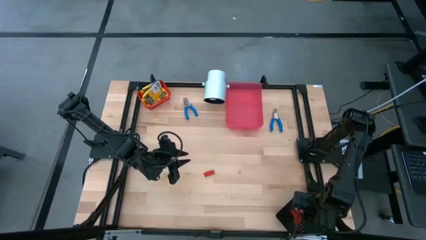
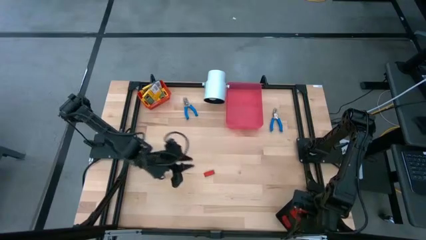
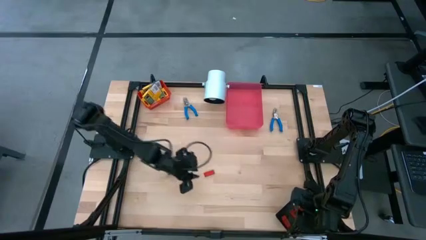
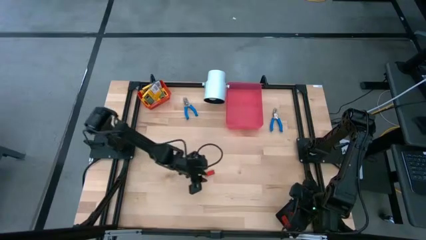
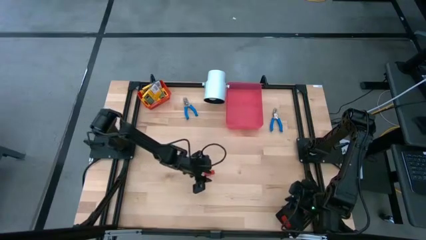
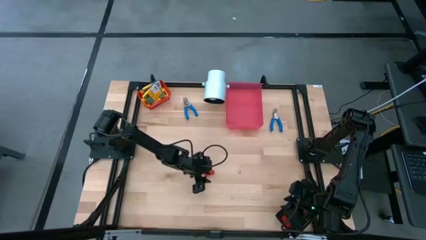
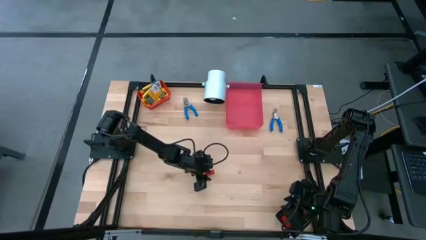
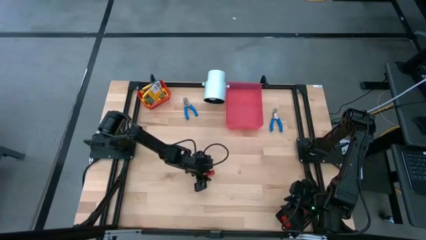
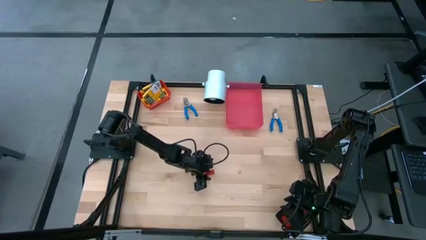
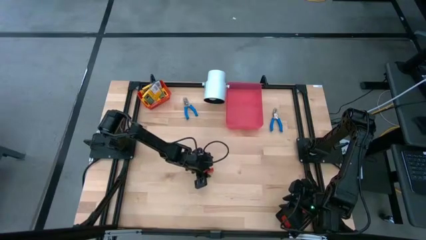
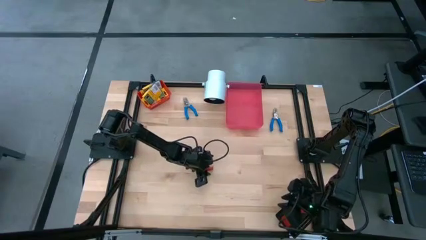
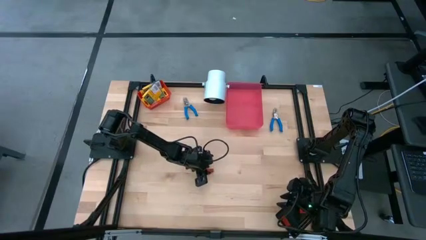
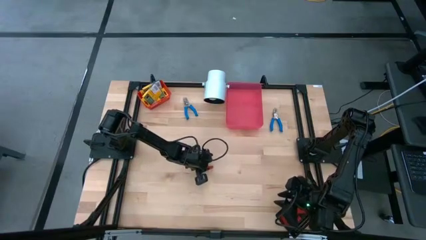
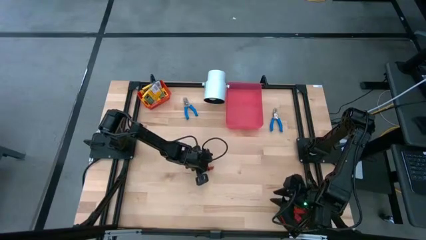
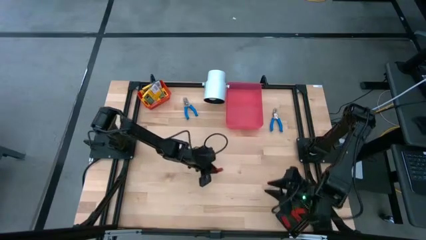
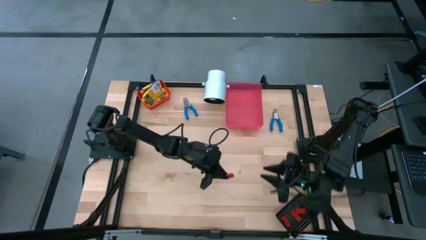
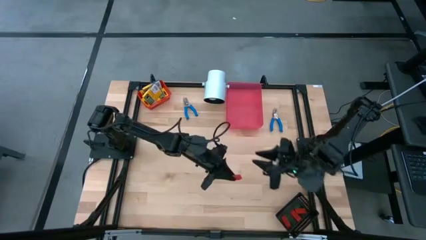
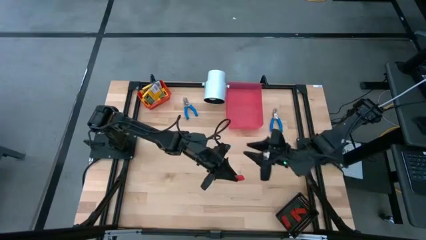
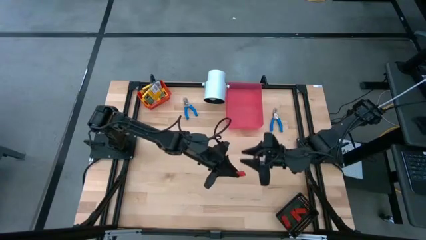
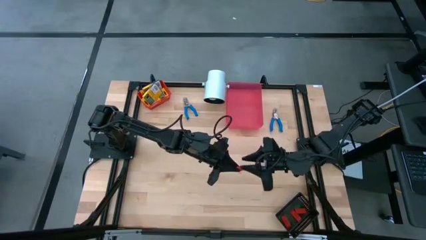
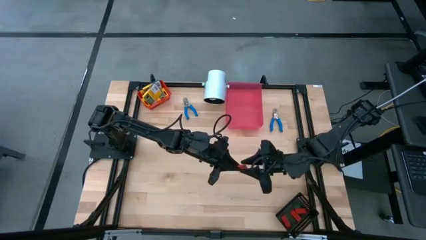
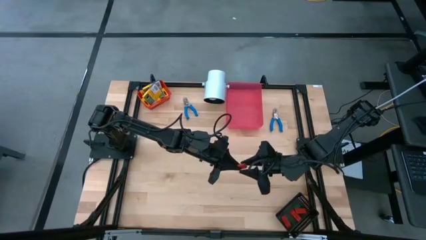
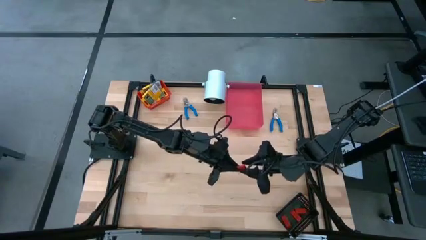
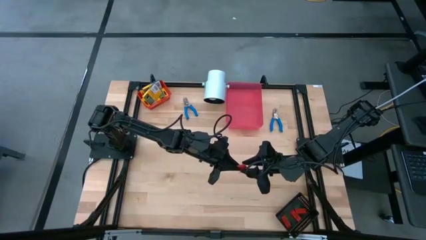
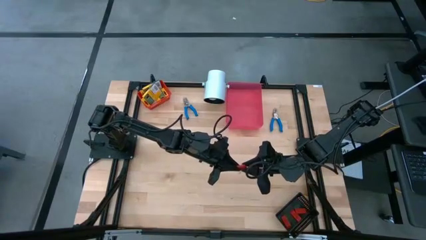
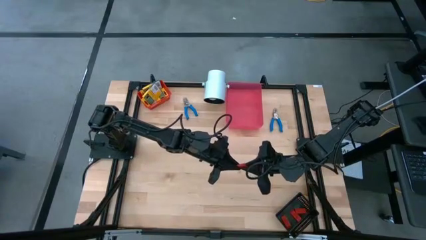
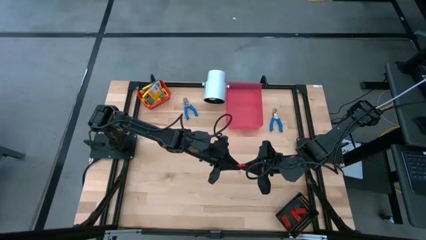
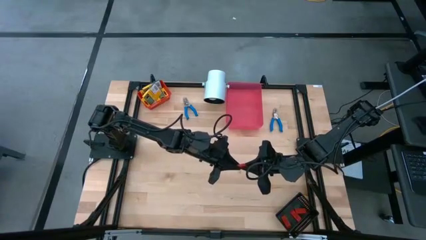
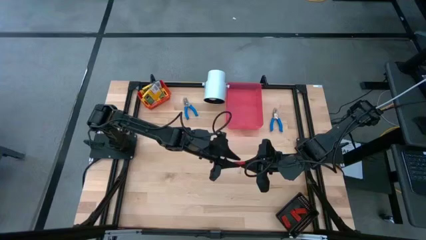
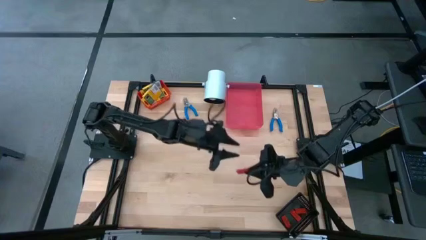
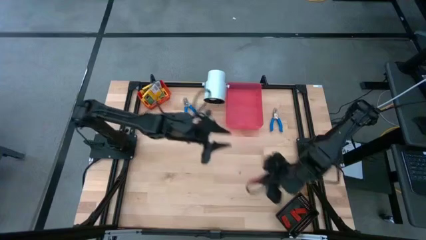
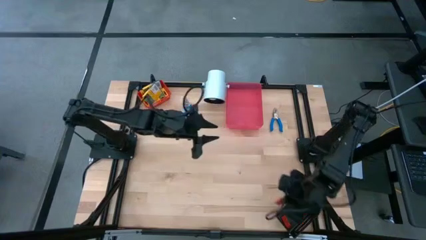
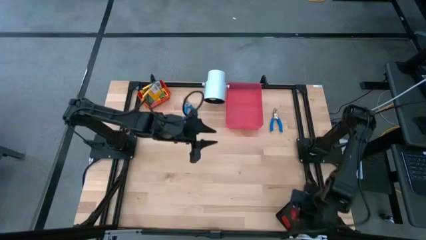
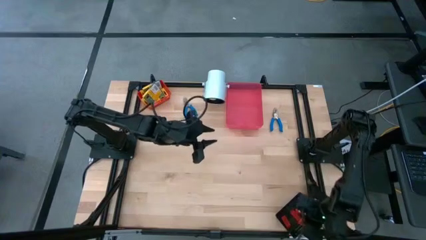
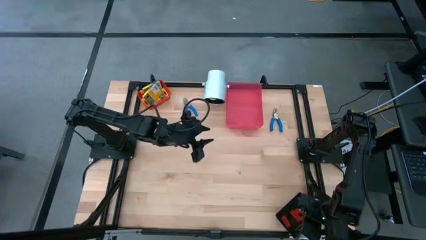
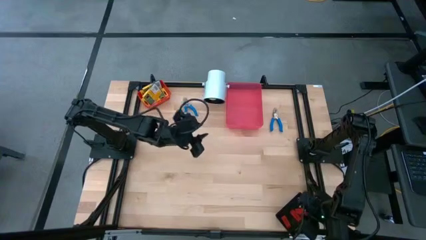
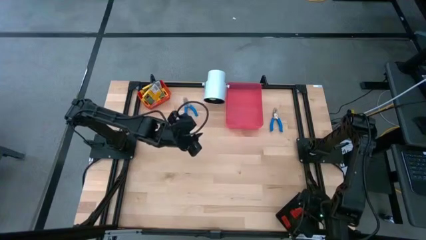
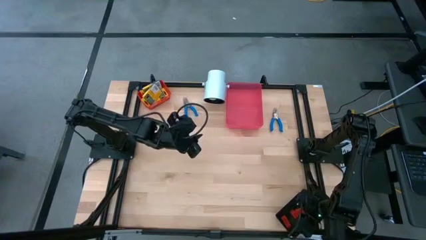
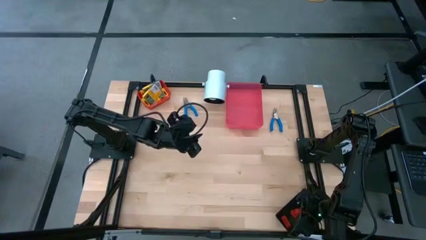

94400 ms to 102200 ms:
Task: Pick & Place School Supplies
Put the red eraser into the black bin

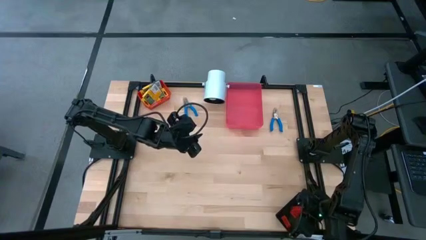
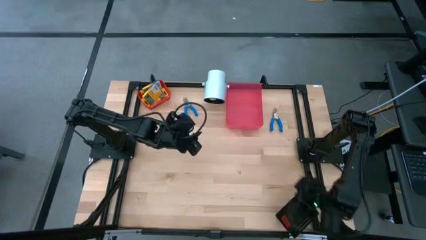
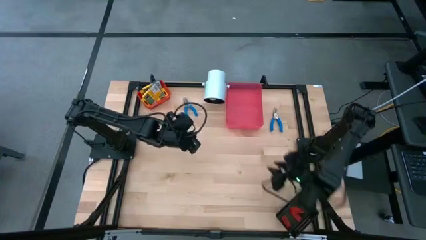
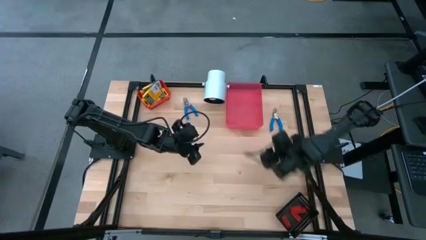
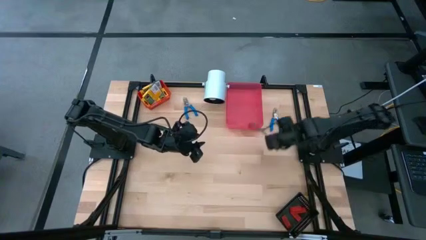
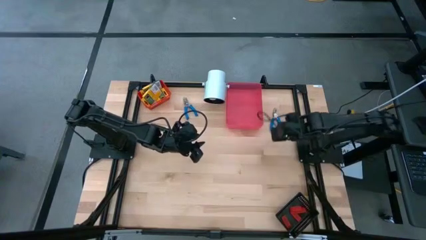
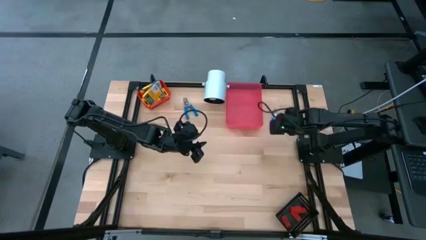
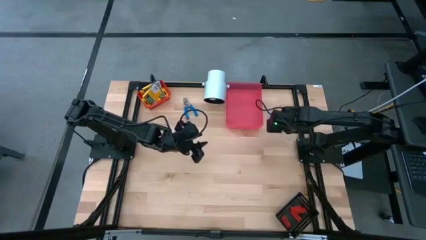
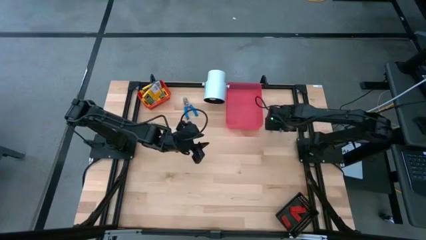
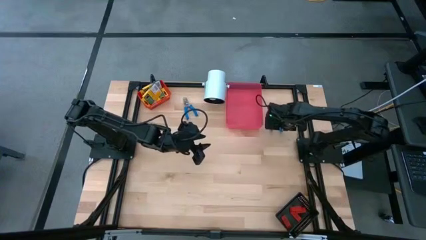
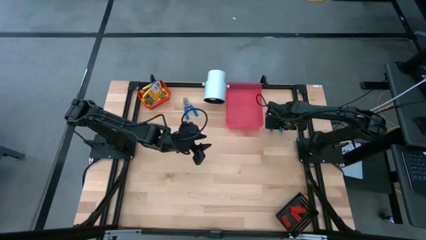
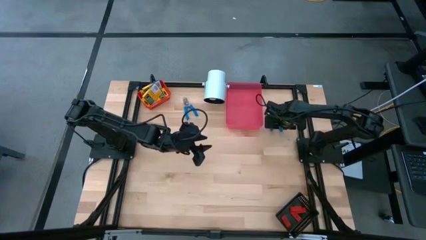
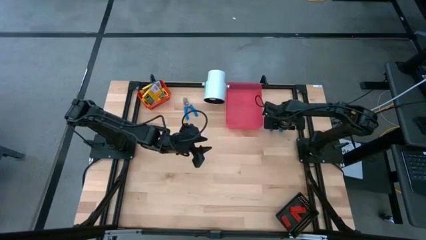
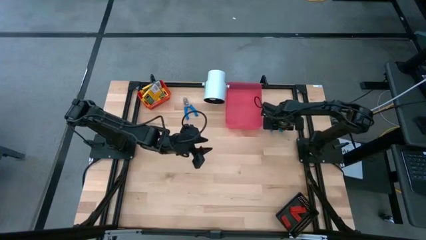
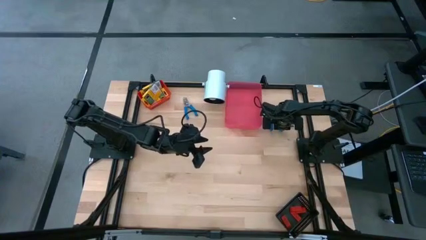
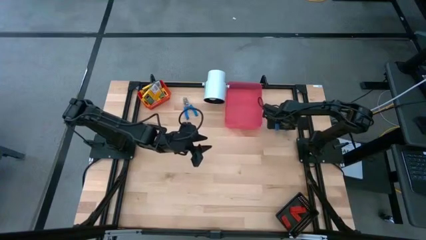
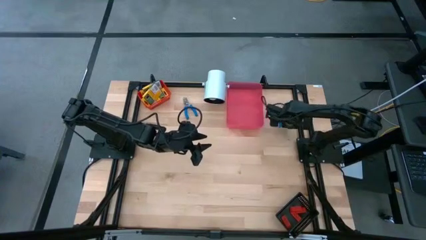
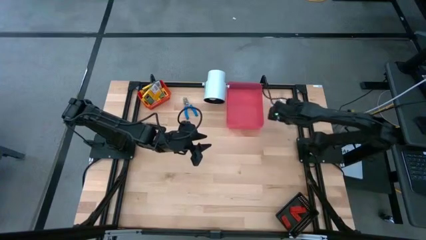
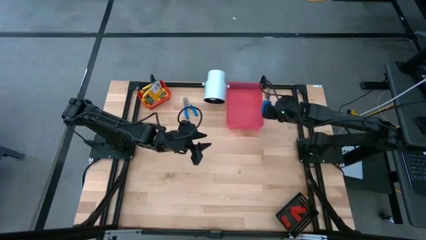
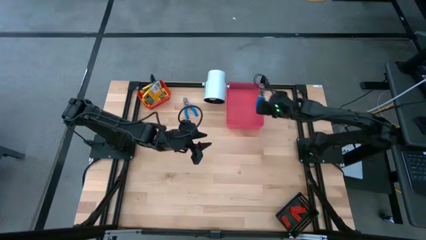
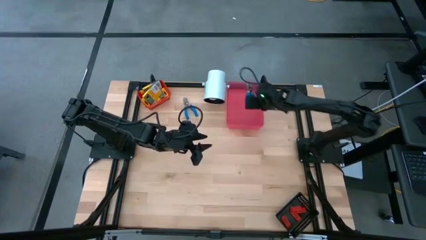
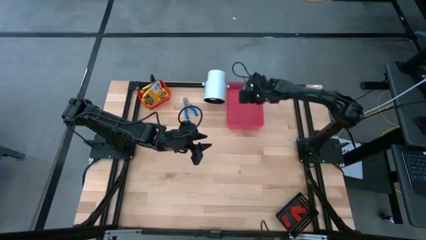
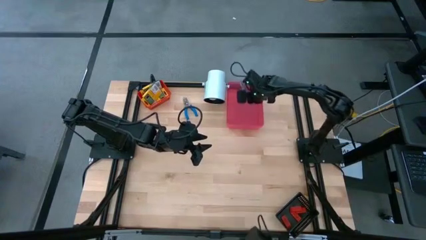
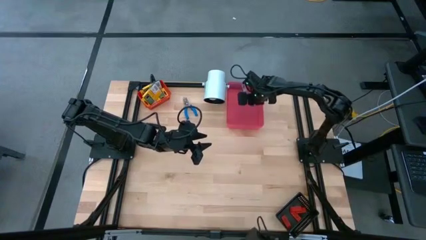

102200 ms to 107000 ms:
Put the blue hole puncher into the pink bin

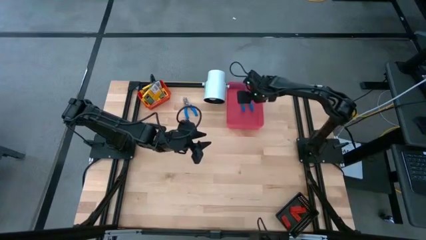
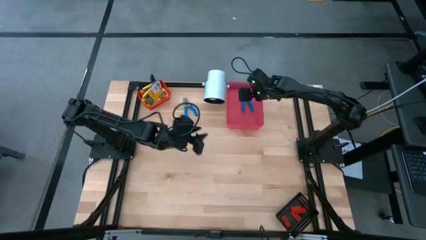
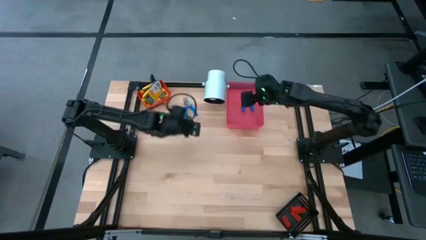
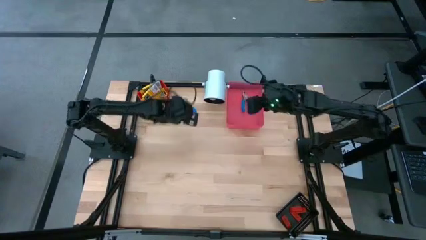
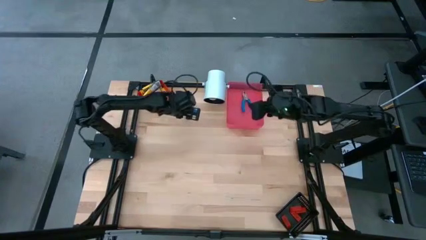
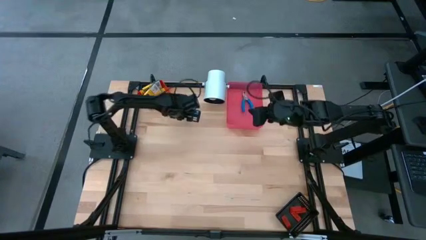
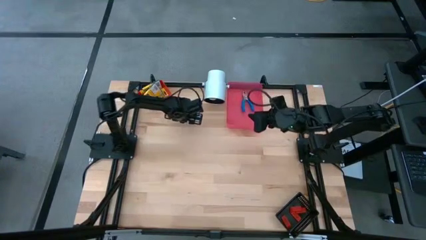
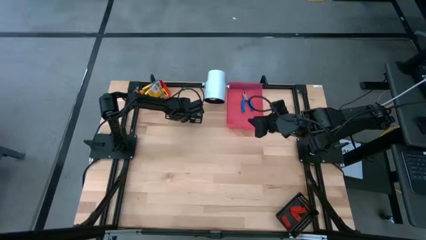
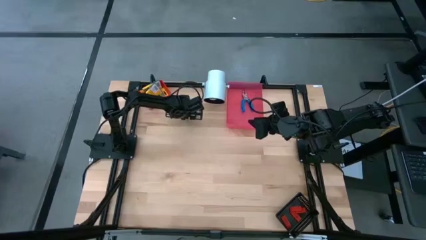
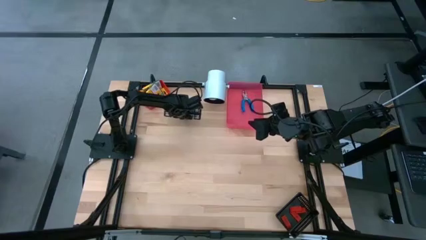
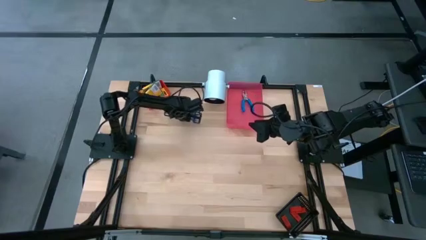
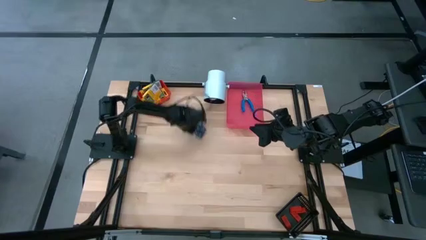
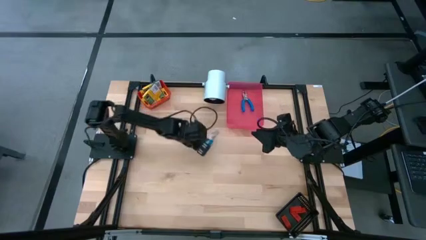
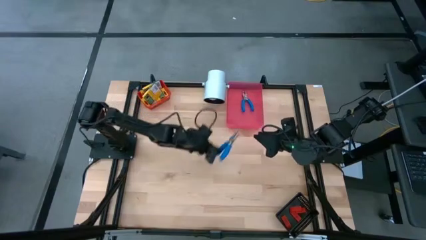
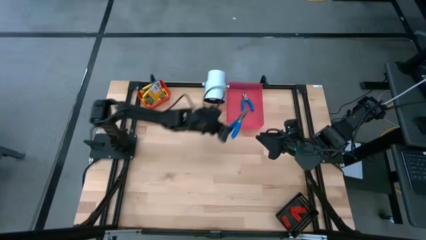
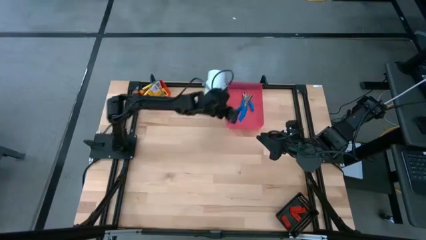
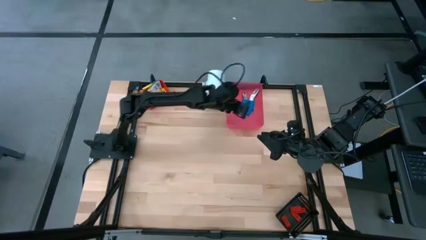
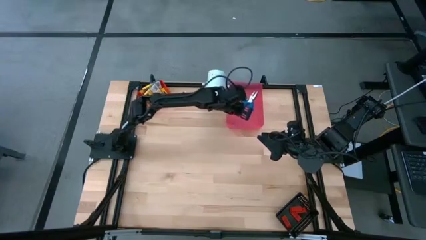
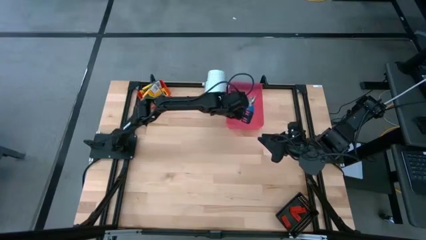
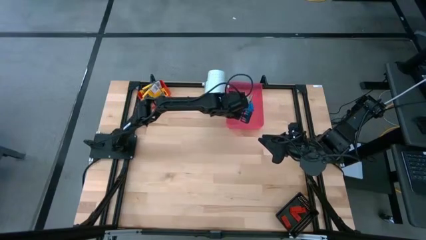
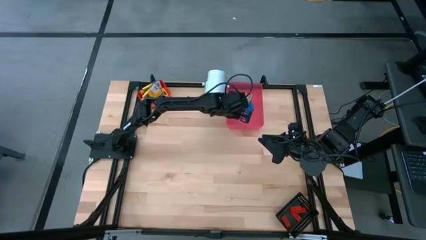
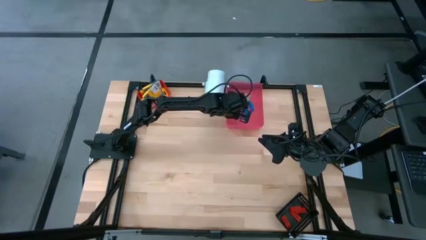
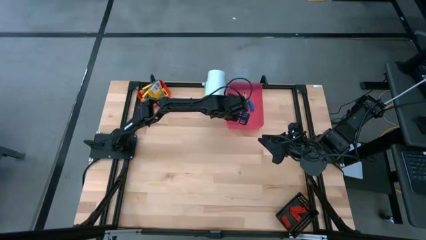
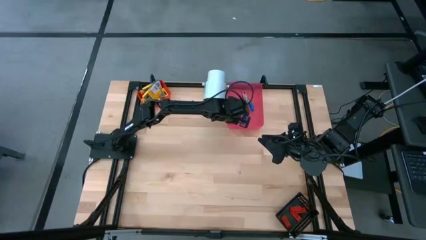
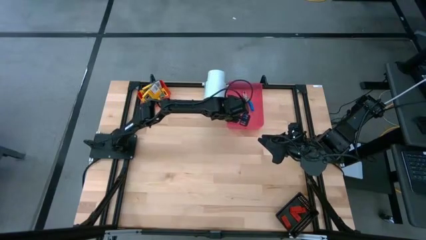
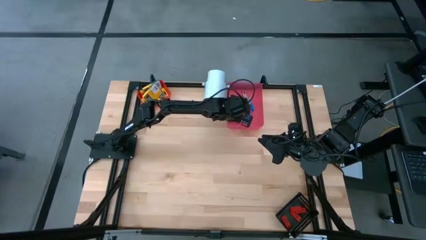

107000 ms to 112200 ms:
Put the blue hole puncher into the pink bin
